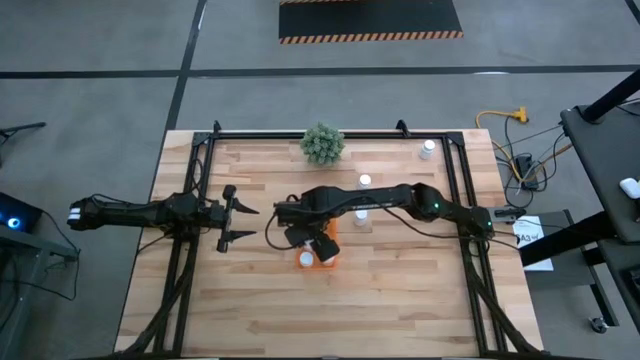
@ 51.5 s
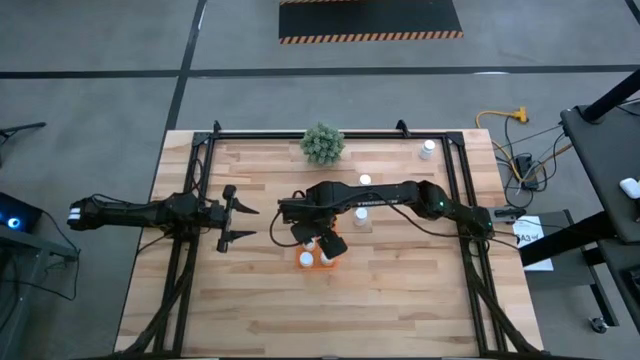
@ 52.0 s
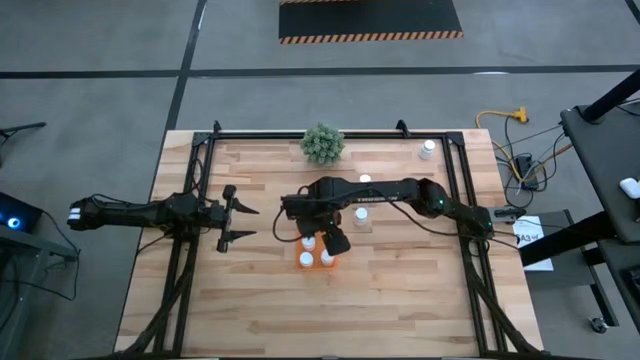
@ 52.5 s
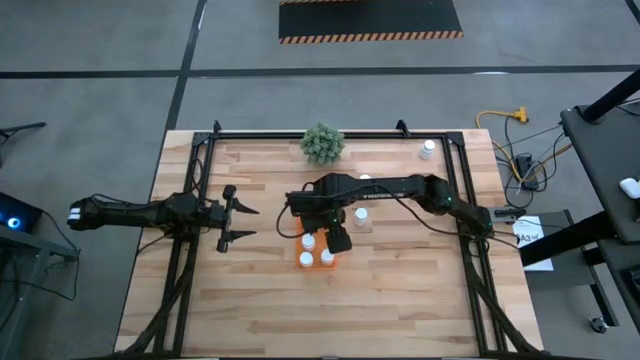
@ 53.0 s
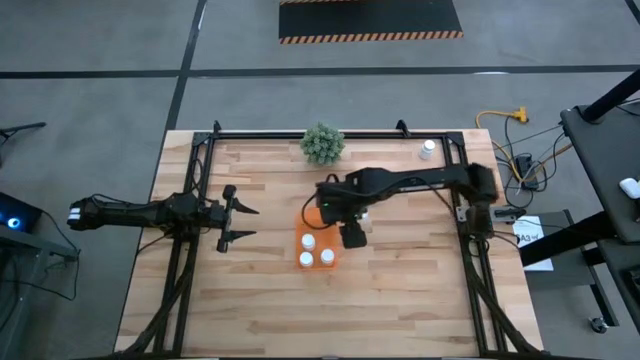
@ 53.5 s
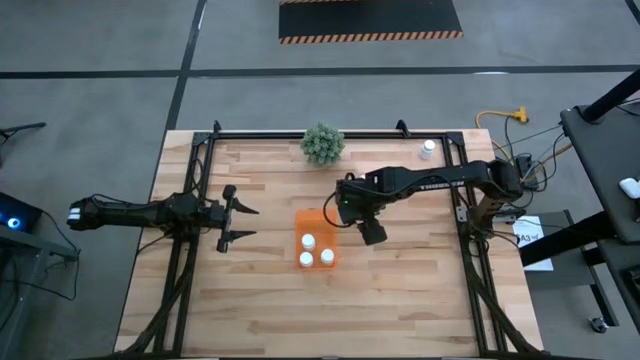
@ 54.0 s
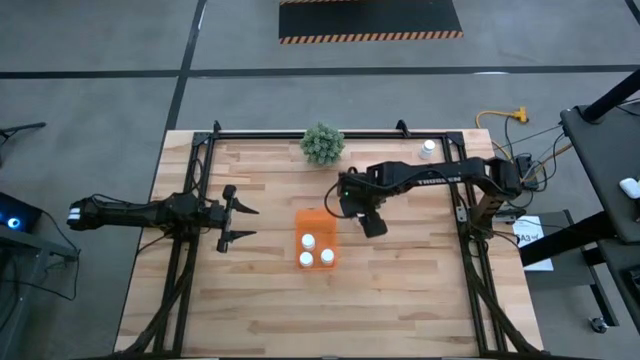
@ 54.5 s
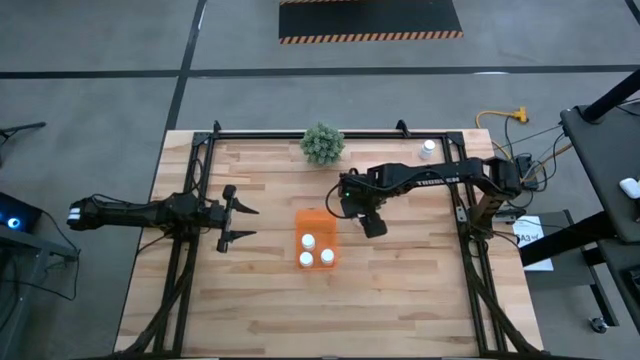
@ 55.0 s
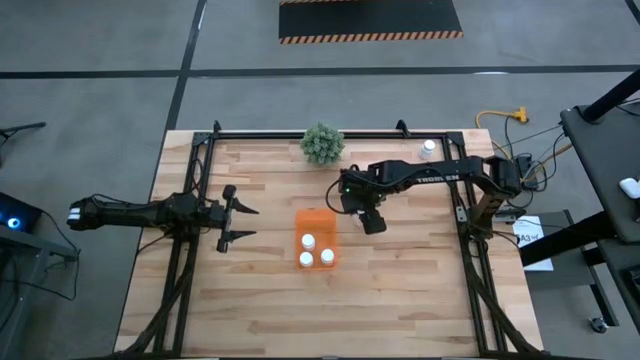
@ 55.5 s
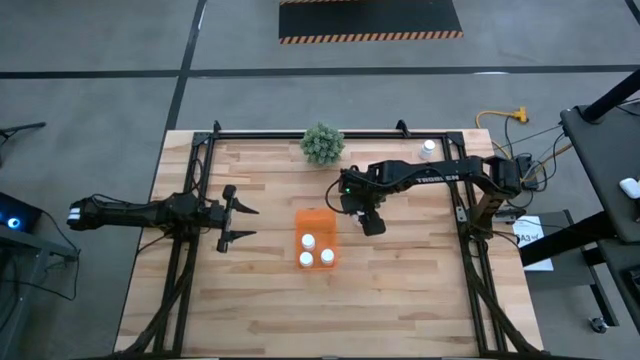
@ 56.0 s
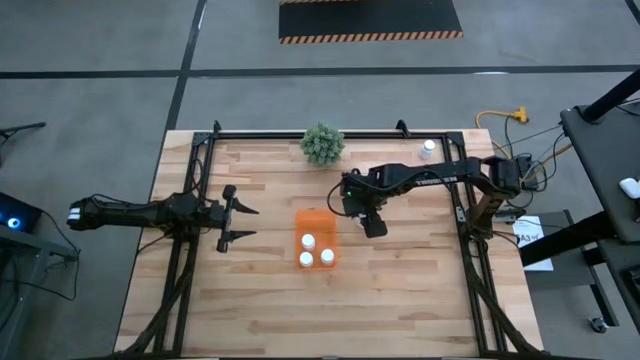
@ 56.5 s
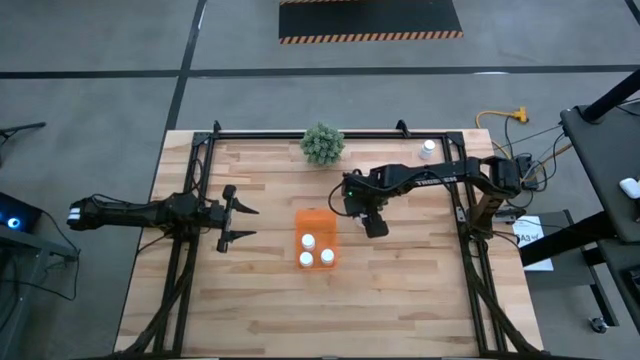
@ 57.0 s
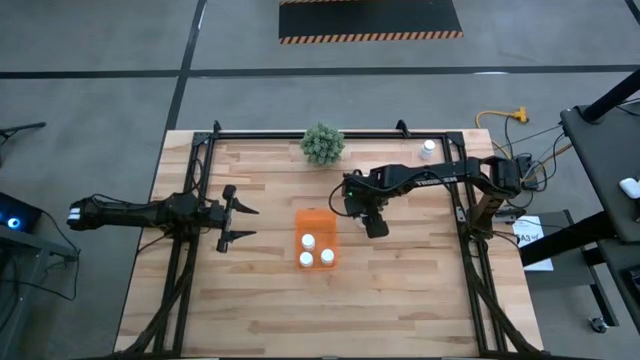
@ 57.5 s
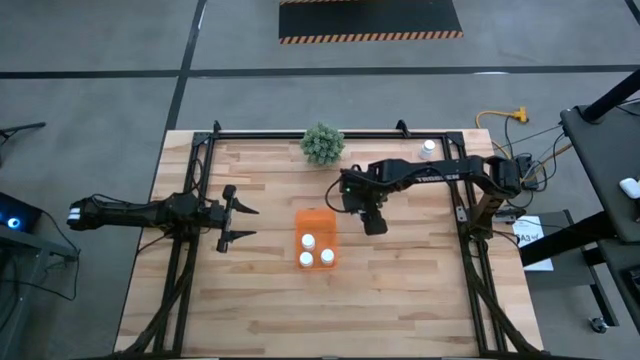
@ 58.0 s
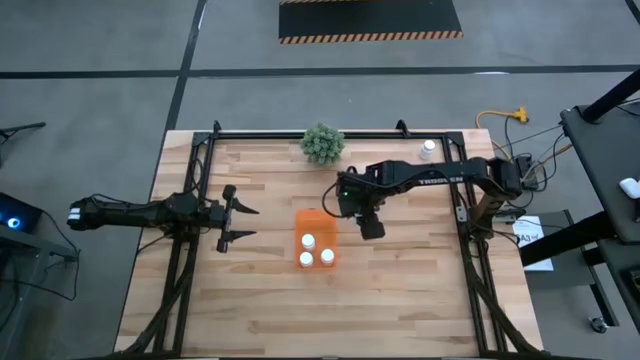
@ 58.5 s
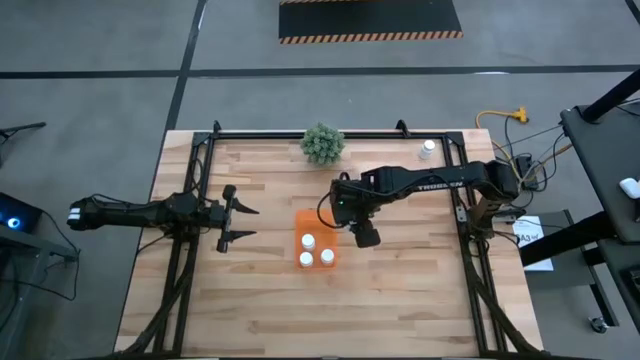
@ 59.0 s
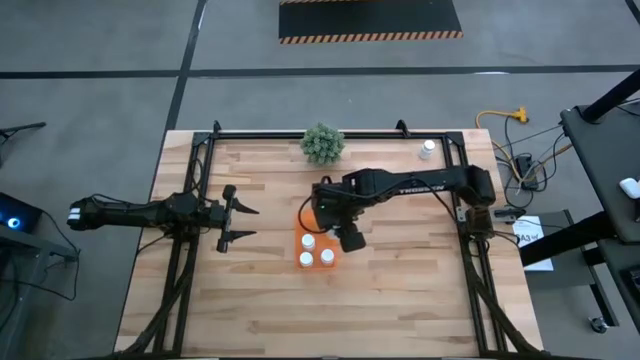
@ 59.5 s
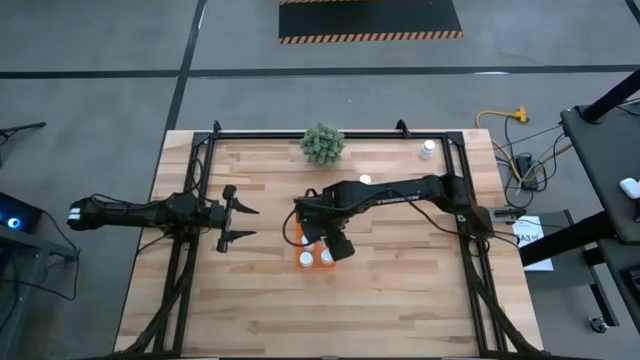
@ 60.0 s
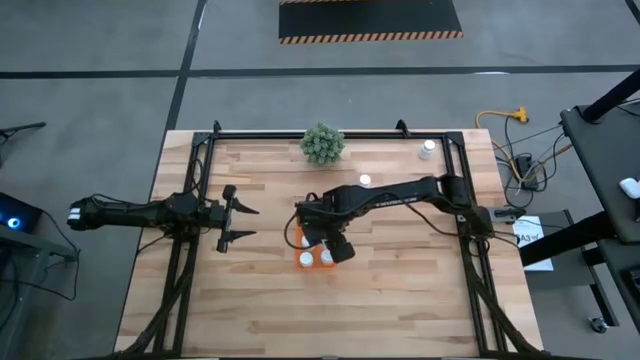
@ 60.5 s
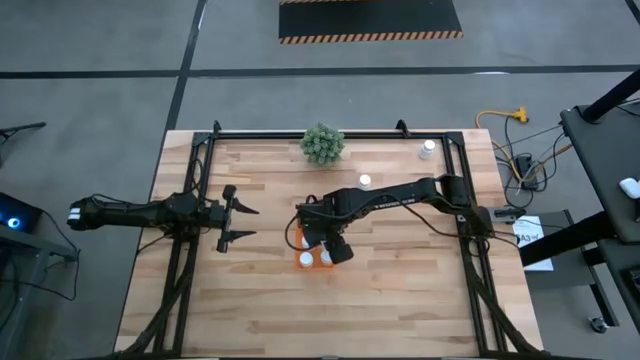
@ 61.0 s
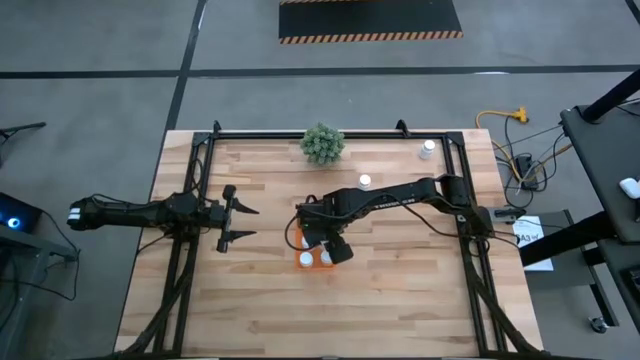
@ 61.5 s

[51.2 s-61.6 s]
Task: Pick and place pill bottles into a basket
Put the bottom left white pill bottle into the orange bin

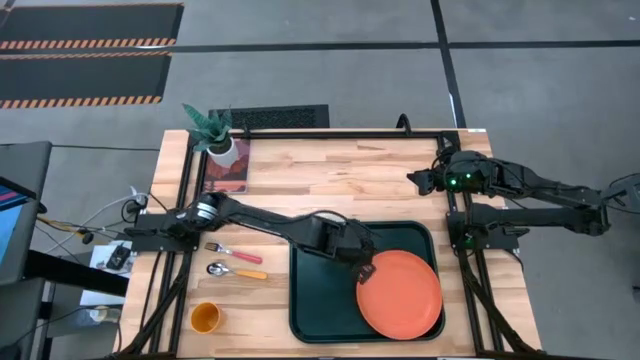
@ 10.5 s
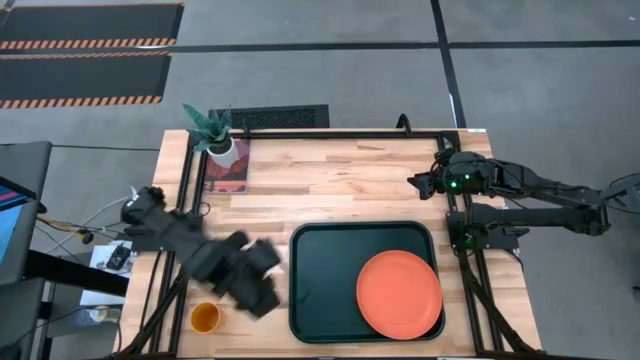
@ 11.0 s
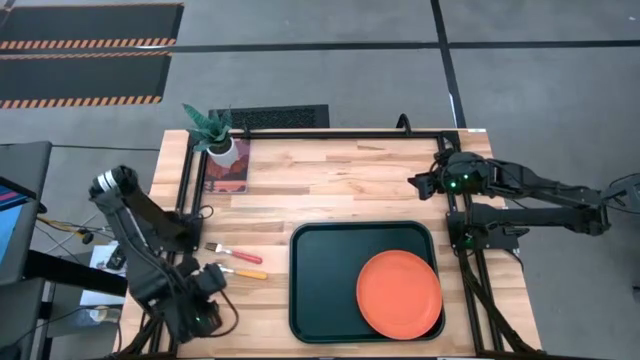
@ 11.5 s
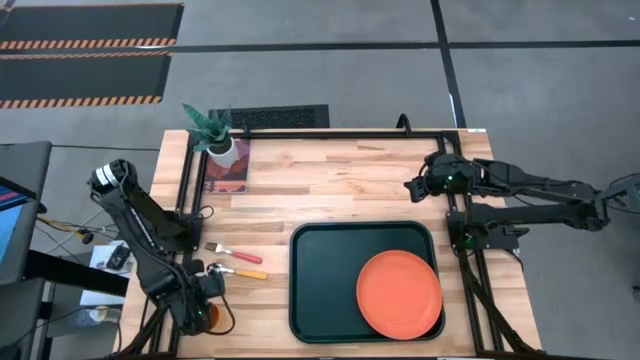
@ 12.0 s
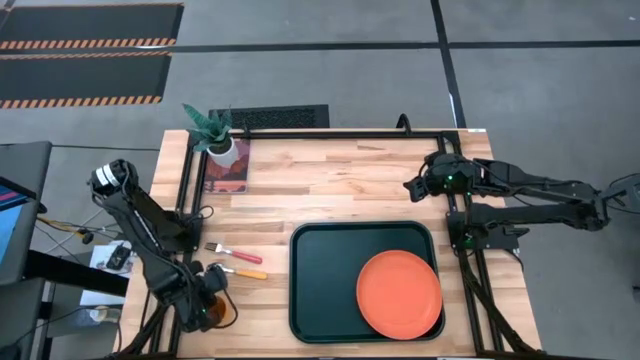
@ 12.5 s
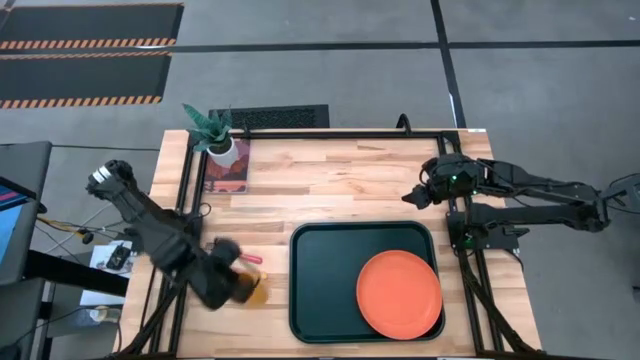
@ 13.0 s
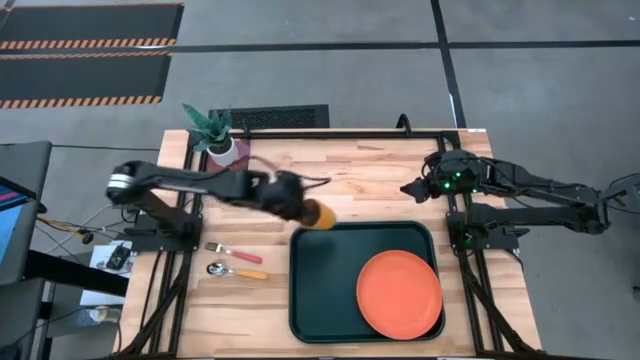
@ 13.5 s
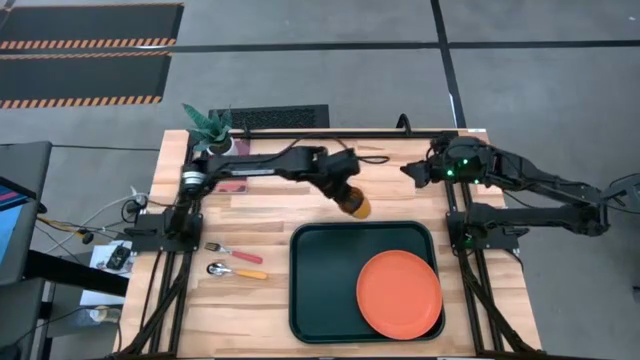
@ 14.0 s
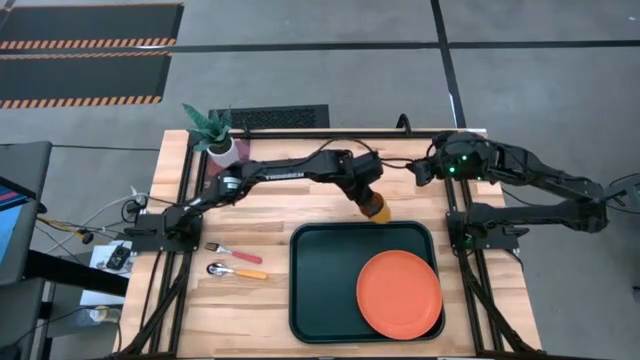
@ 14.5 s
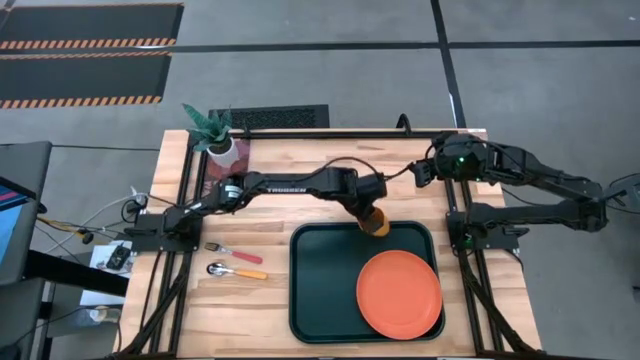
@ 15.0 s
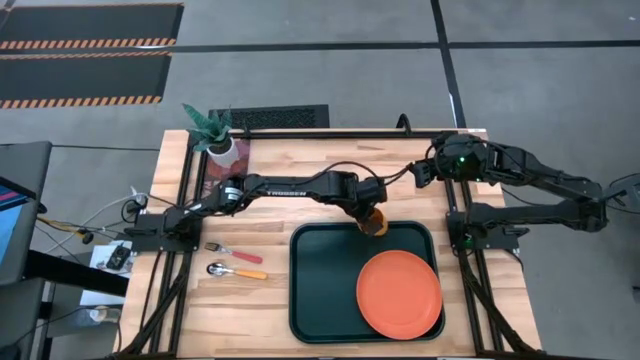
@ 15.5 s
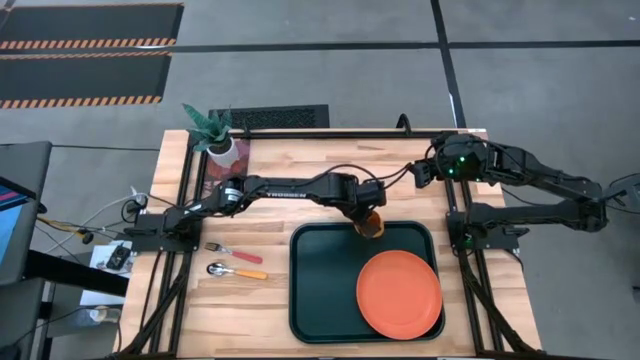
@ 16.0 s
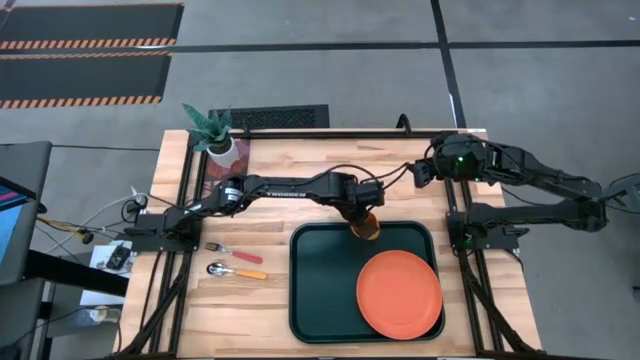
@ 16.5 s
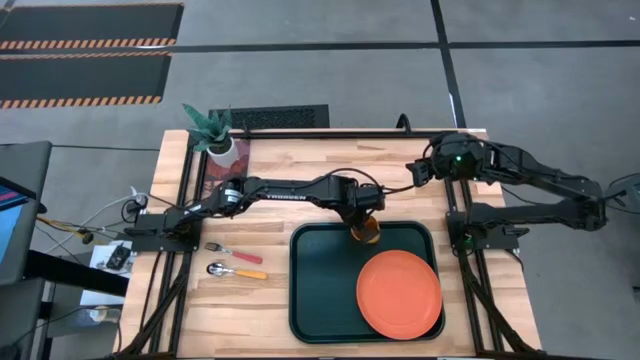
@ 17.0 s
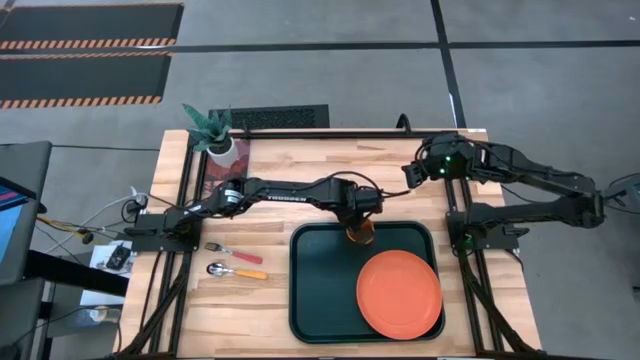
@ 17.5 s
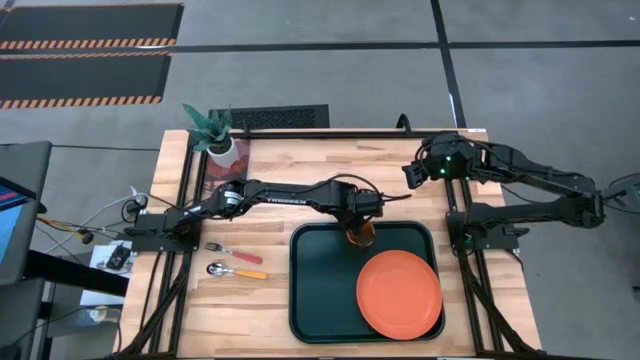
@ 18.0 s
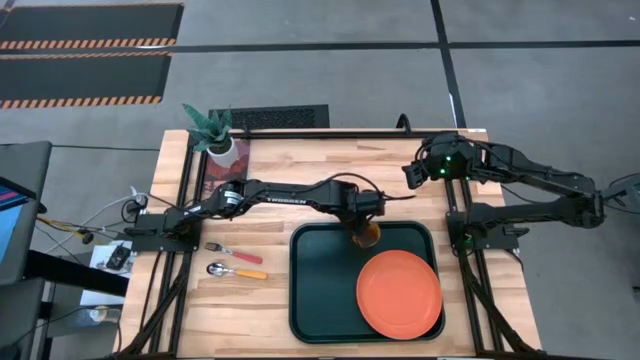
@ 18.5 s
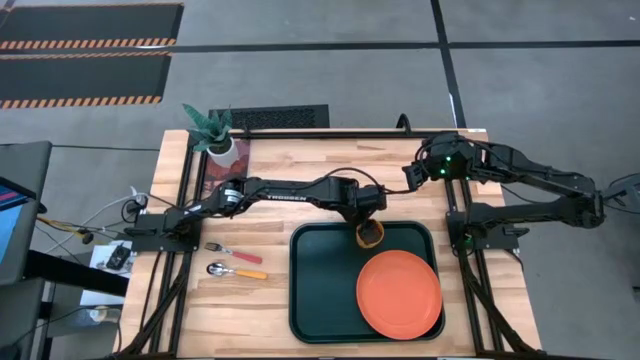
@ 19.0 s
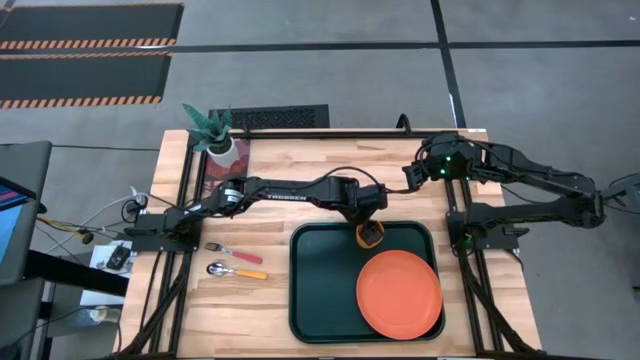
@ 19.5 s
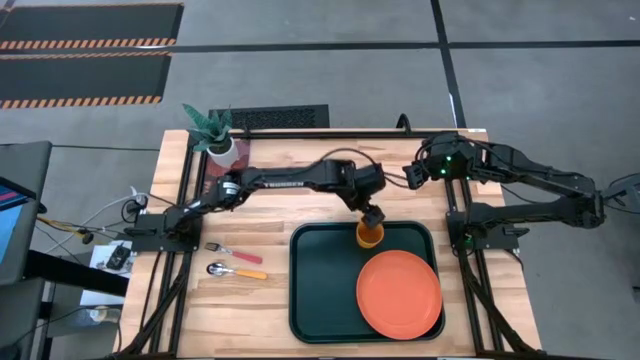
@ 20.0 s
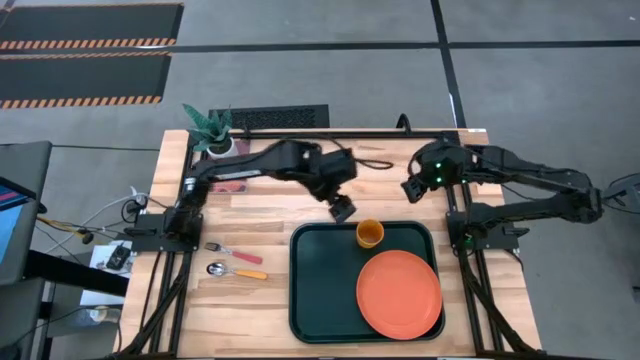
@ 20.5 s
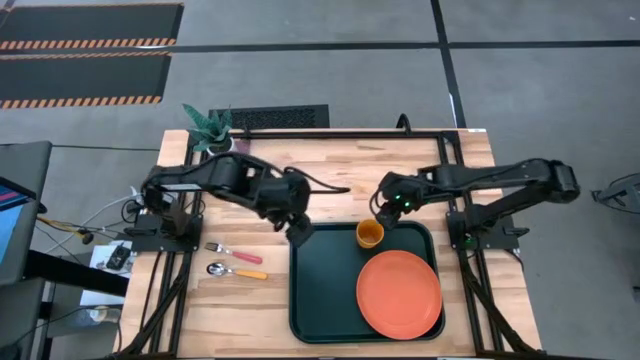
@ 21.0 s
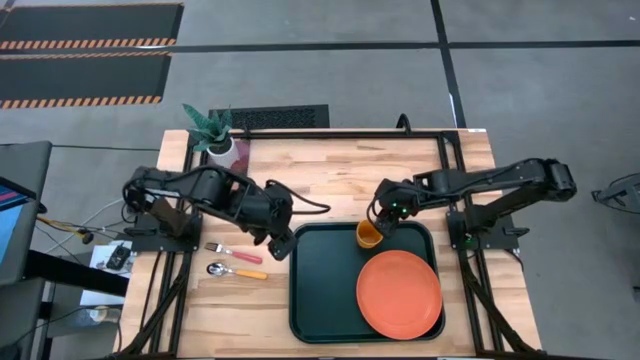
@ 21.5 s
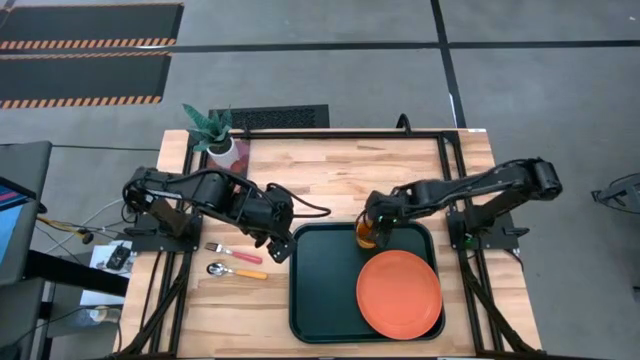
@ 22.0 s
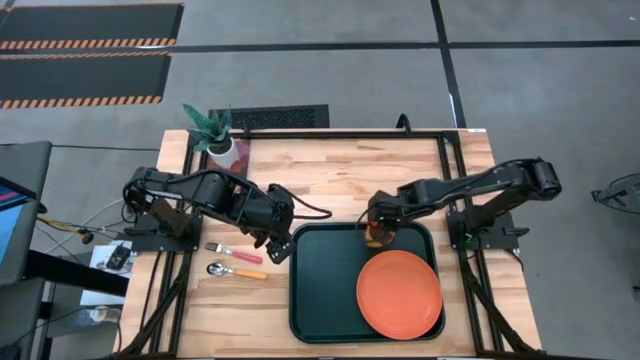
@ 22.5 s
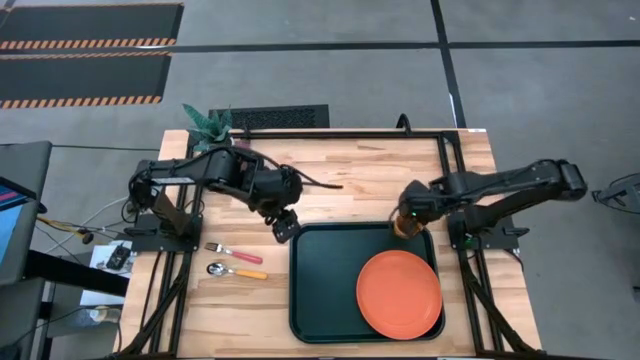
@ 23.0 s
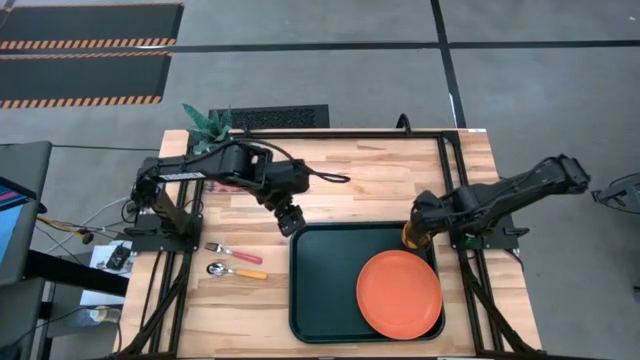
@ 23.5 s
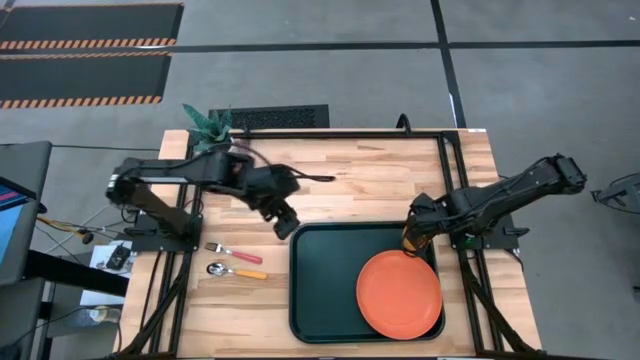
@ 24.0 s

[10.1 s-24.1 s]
Task: Pick and place plate/cup/fork/spoon on tray
Put the yellow cup above the orange plate on the black tray
